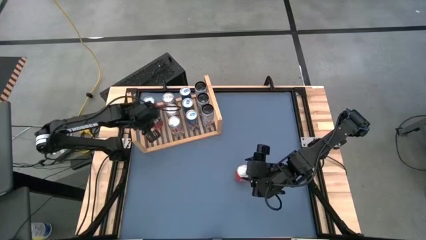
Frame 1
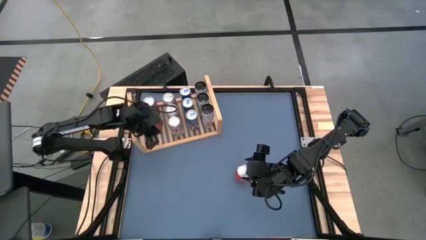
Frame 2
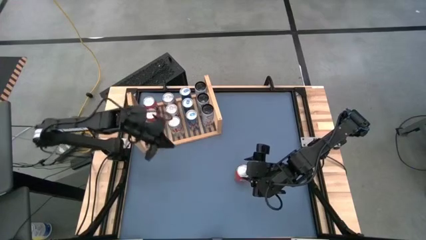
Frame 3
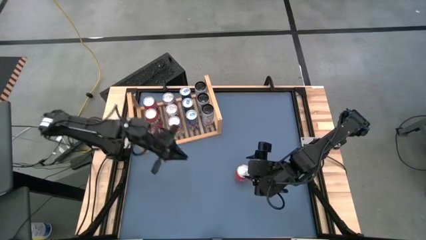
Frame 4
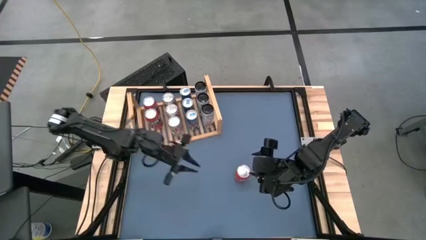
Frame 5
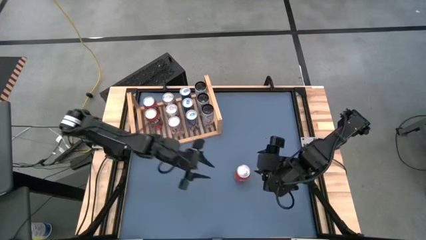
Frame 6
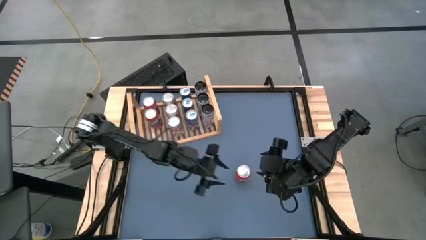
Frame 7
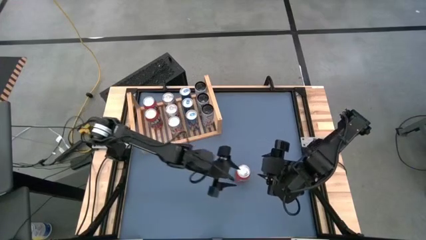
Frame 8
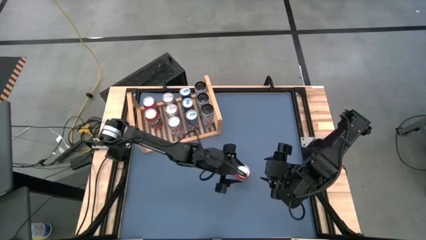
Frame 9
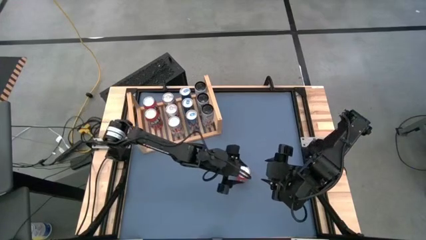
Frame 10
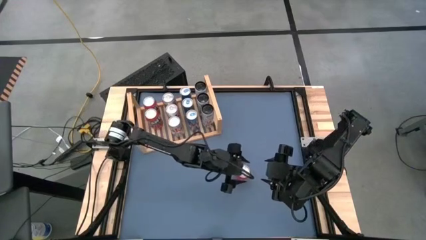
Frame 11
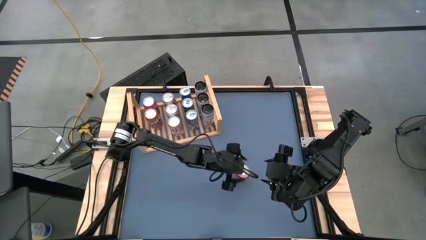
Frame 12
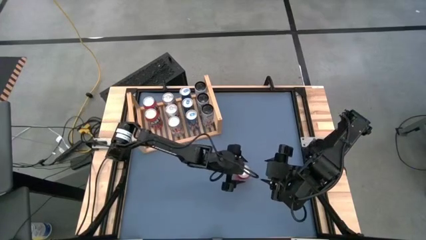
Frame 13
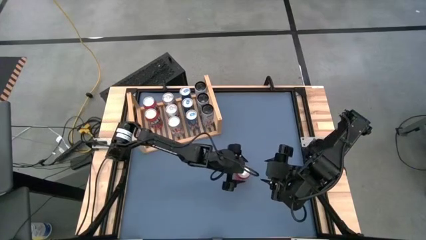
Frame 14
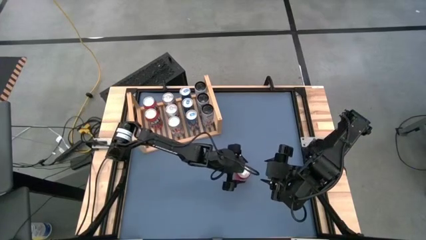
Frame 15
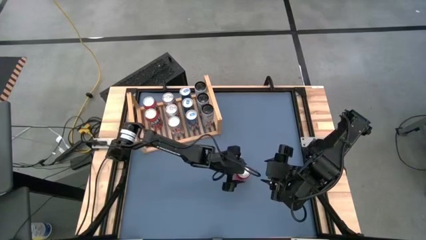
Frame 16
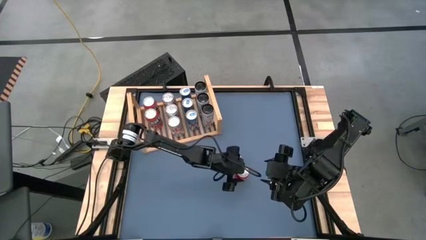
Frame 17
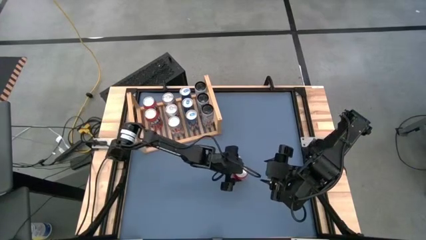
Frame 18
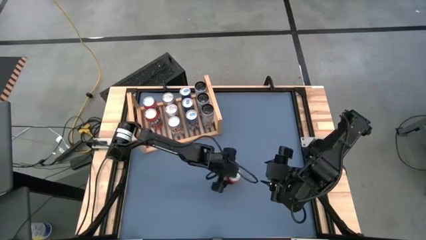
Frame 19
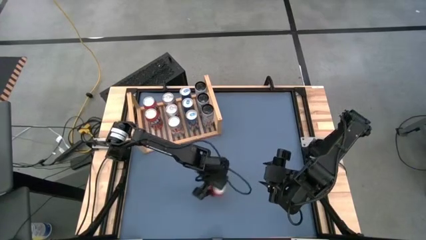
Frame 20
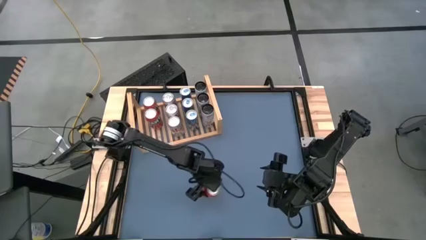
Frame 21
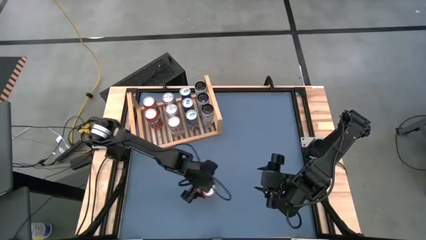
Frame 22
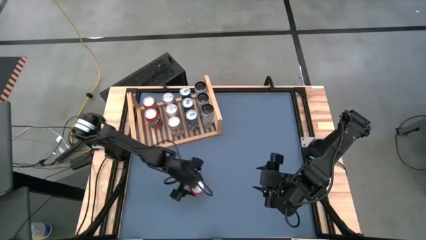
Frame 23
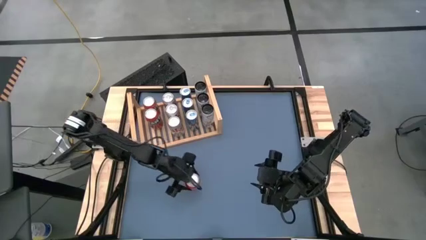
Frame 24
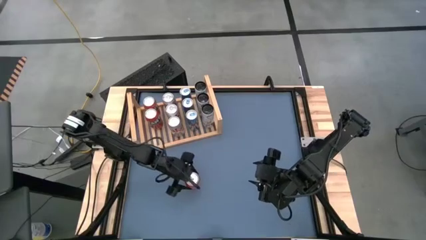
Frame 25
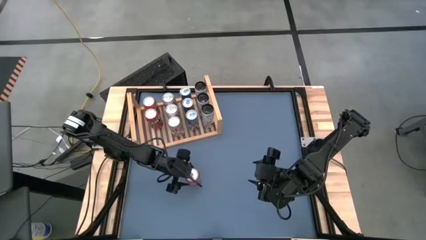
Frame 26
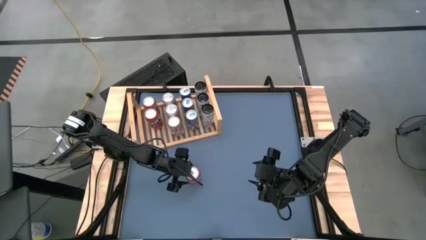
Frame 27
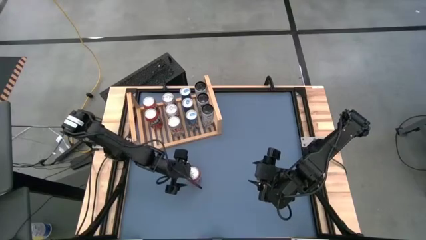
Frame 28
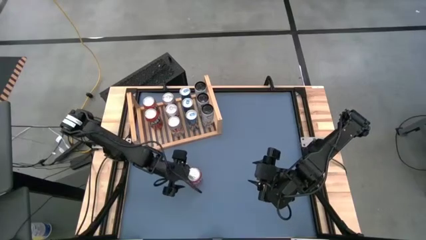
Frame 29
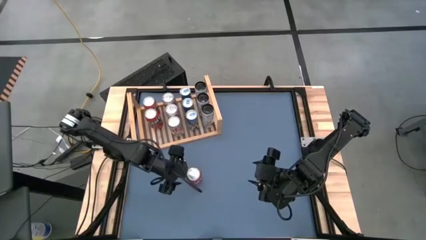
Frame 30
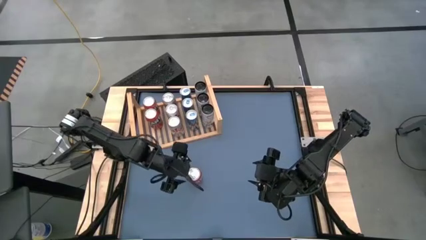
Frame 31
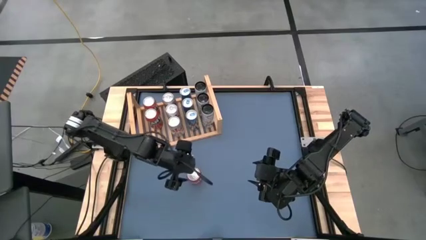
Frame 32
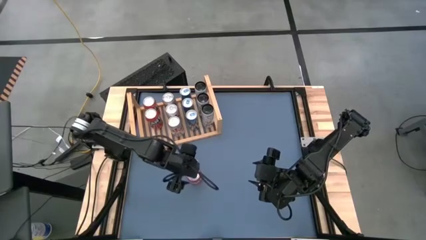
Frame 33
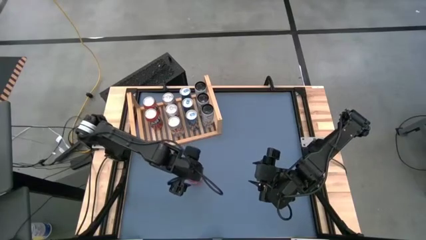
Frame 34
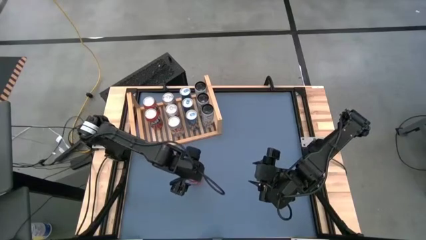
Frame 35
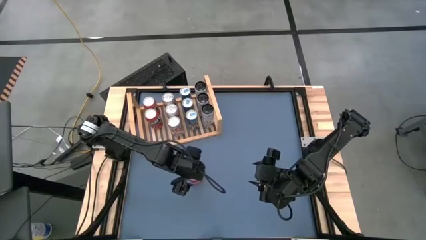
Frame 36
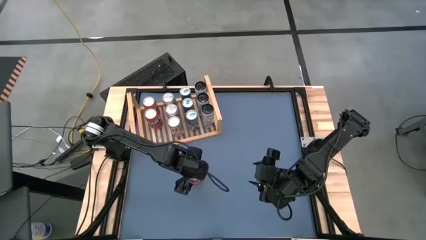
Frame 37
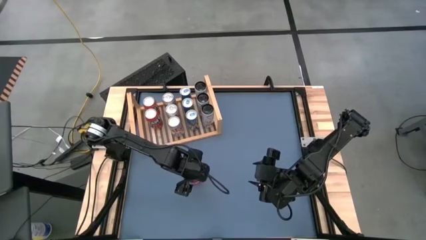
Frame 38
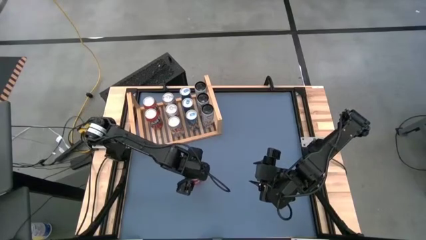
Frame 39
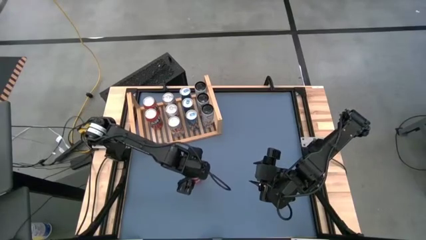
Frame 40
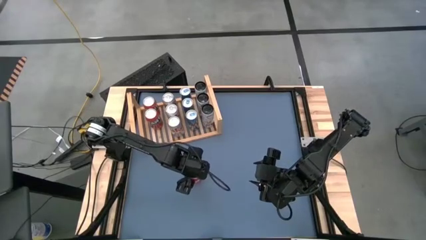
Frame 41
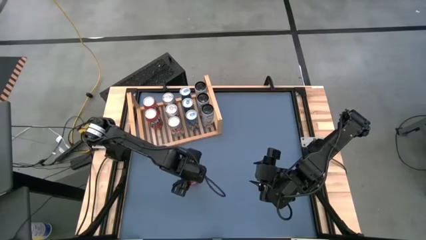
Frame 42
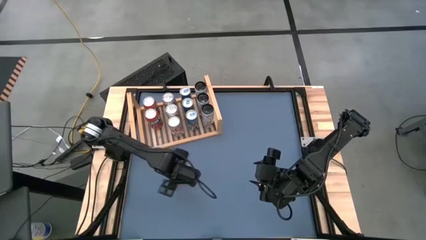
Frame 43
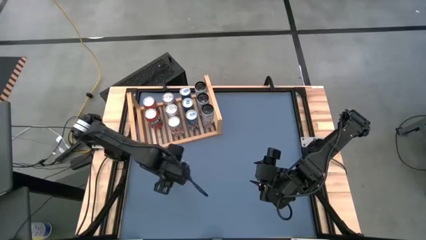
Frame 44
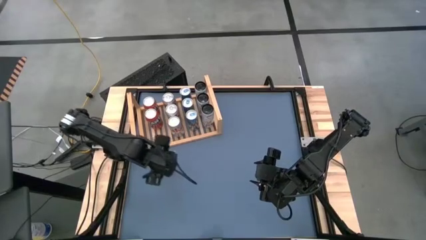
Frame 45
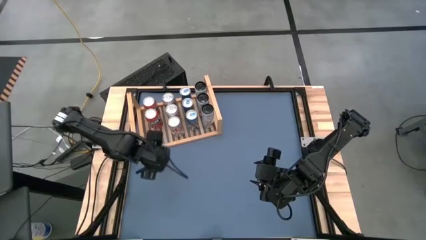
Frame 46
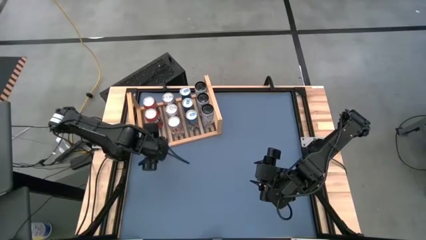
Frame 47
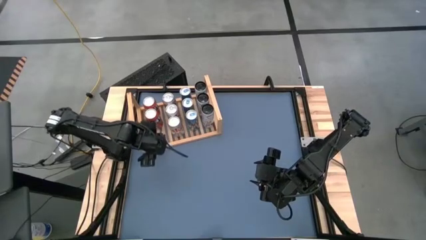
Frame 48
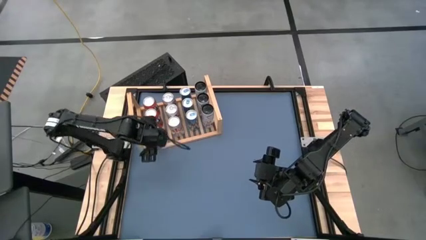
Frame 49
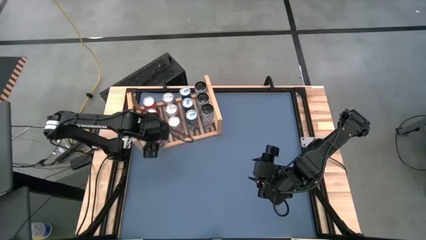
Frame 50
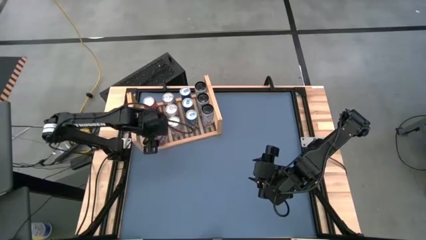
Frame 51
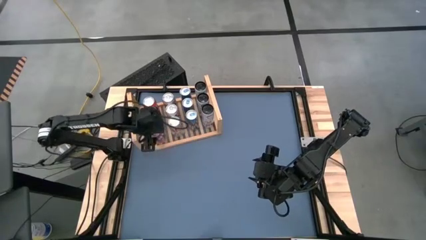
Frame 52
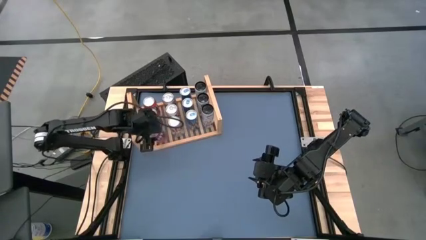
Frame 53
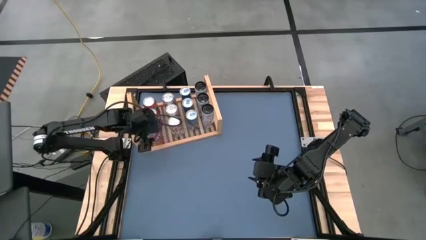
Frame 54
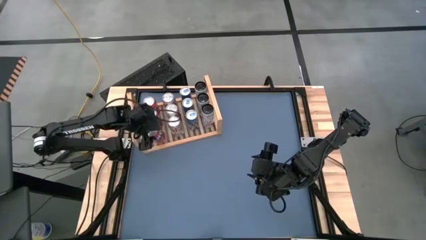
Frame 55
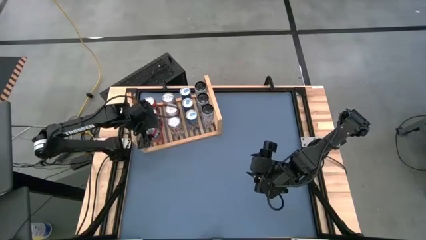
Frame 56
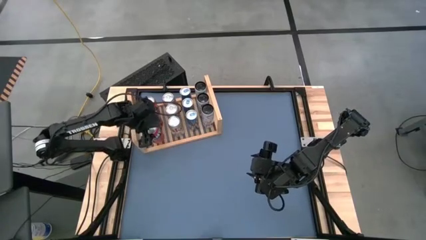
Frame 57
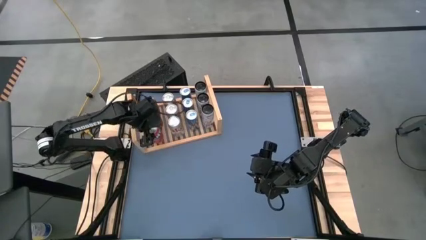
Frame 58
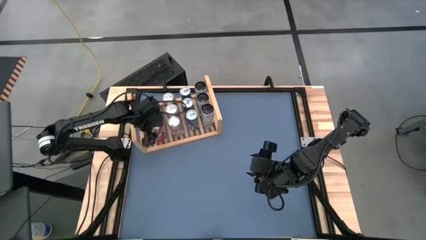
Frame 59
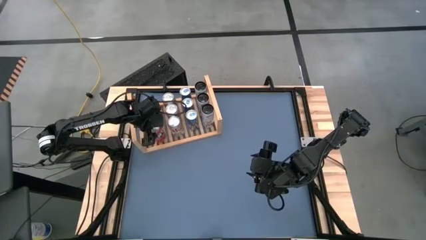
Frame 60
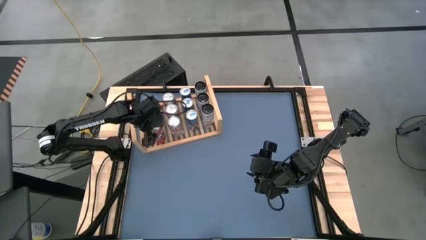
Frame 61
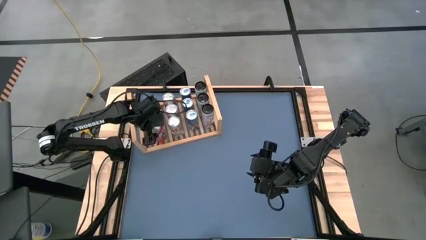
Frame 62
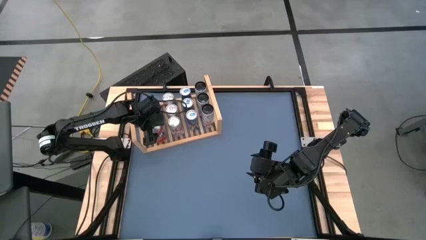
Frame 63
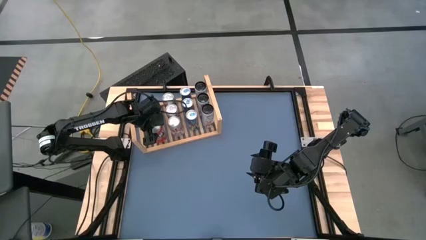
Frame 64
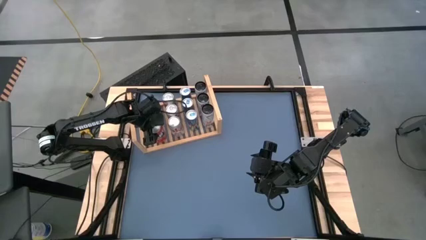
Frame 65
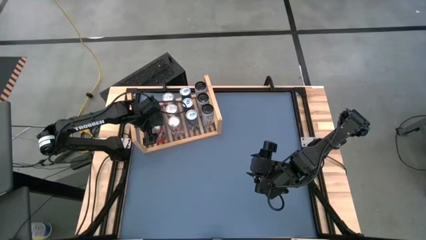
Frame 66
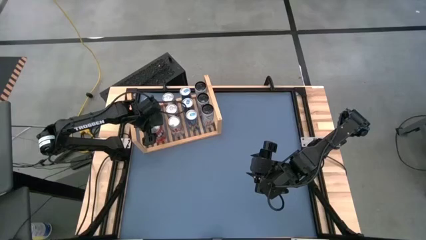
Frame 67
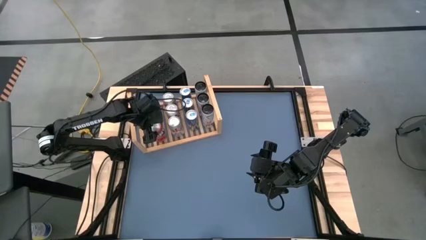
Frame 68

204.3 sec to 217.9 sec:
Task: Place canned beverage on shelf
Put the red soda can on the shelf aligned with the other red soda cans

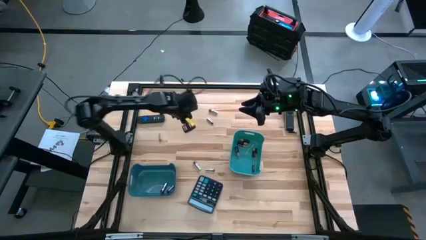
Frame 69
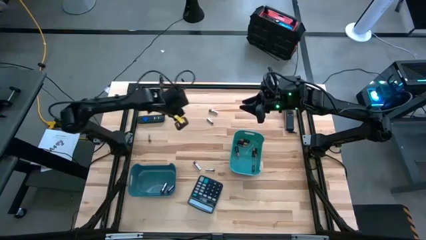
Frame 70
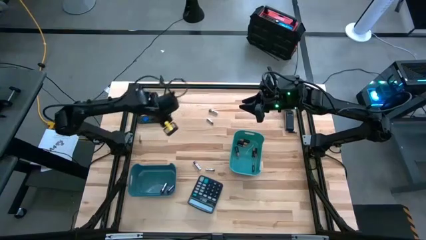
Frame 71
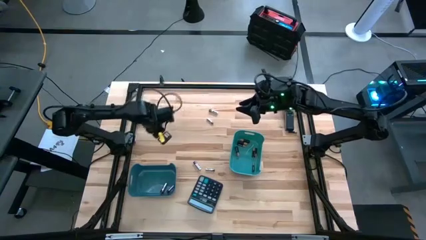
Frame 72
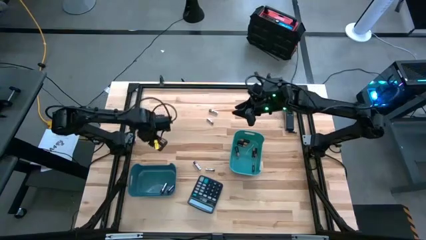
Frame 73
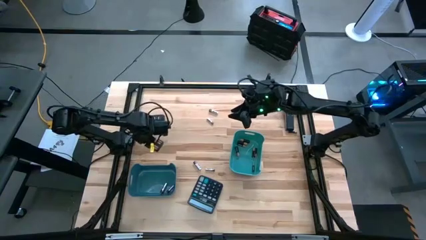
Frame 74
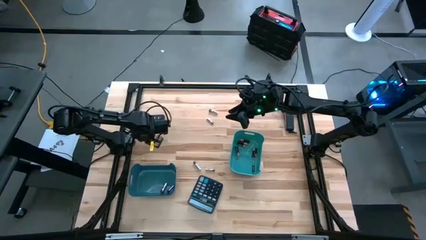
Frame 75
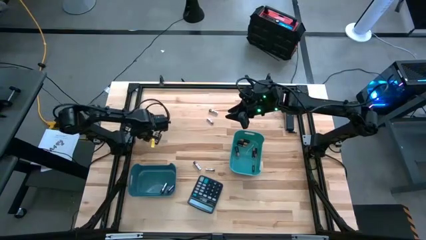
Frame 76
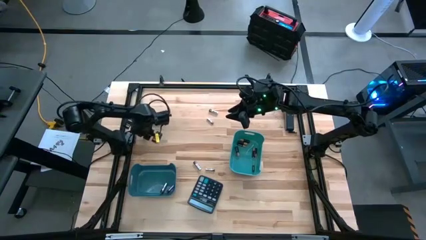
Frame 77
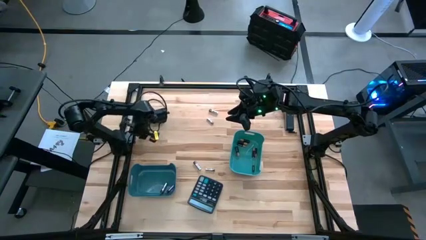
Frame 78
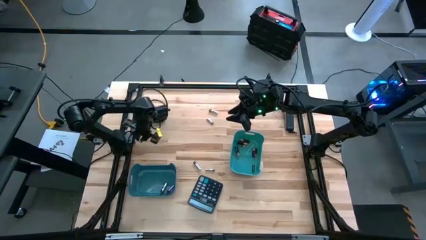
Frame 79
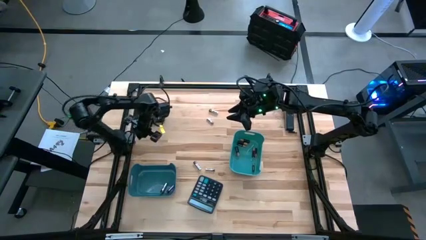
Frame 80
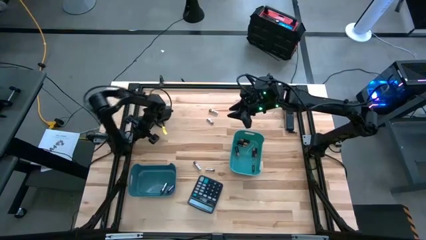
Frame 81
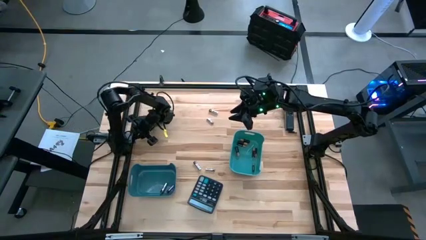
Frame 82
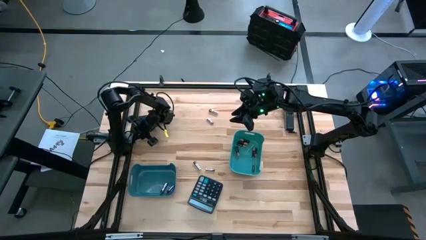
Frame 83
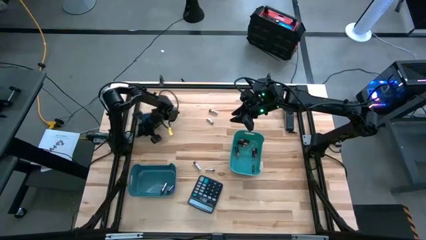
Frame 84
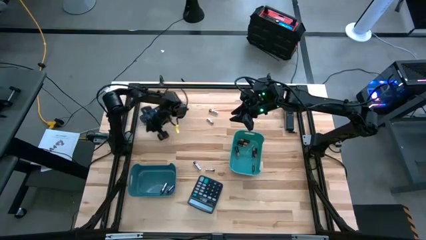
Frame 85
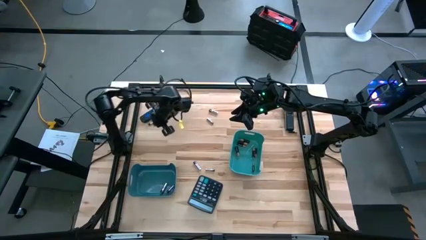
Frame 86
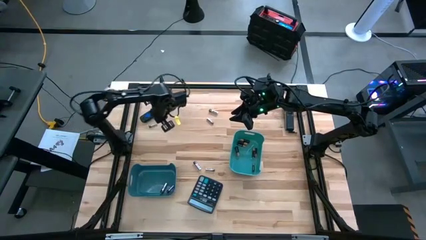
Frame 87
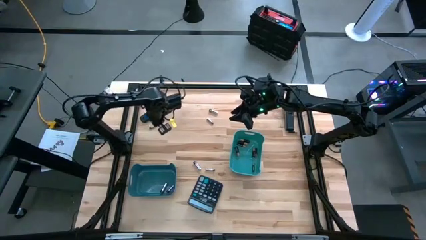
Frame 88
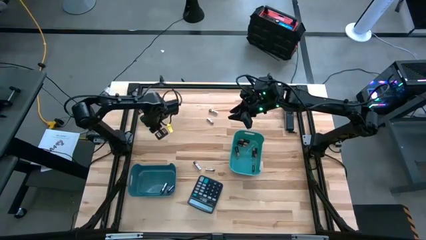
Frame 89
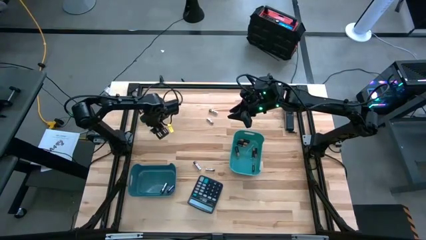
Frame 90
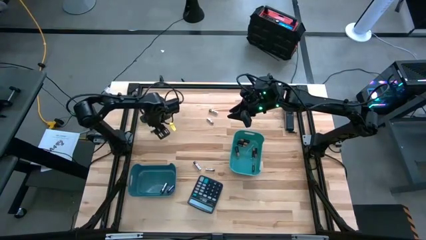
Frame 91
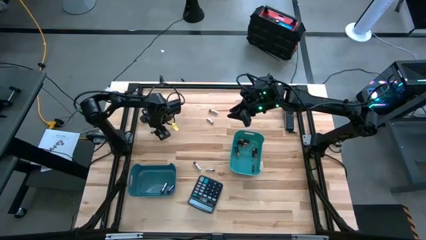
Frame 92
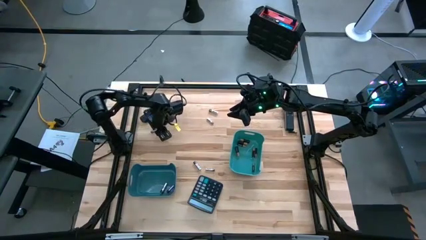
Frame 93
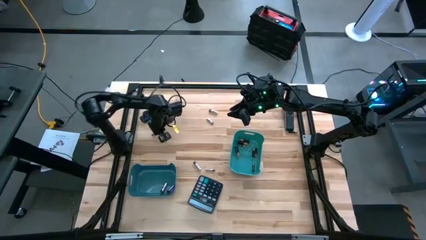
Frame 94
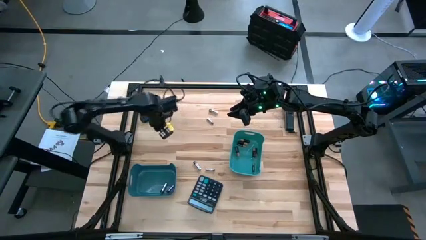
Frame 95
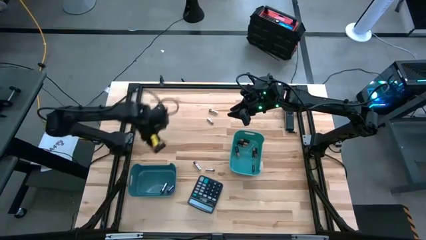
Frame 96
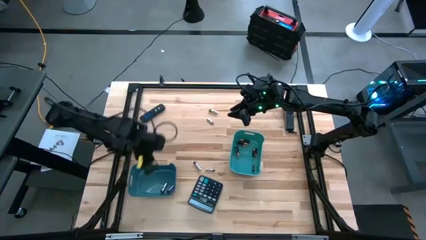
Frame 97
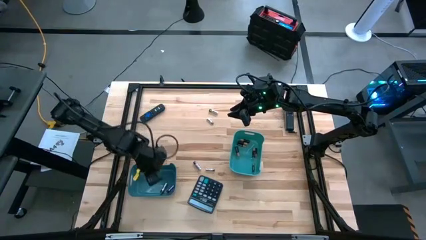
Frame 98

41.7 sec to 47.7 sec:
Task: Sort batteries
Put the silver battery into the dark blue bin
